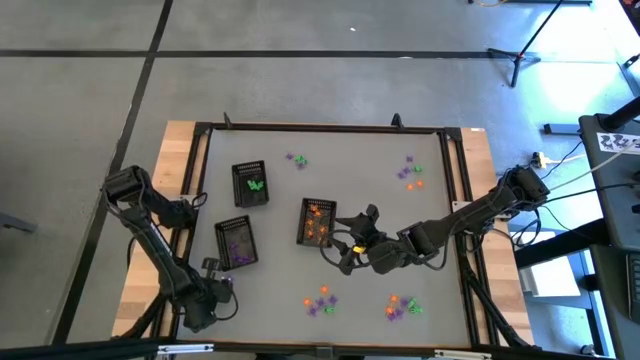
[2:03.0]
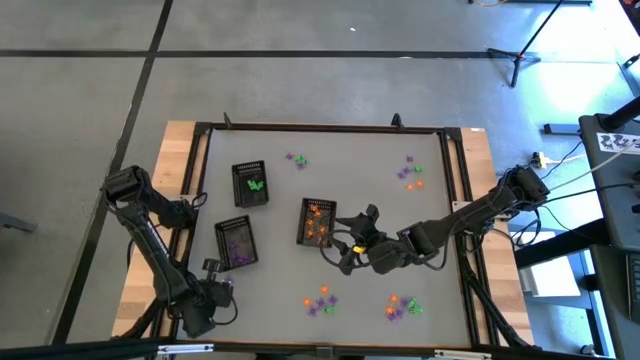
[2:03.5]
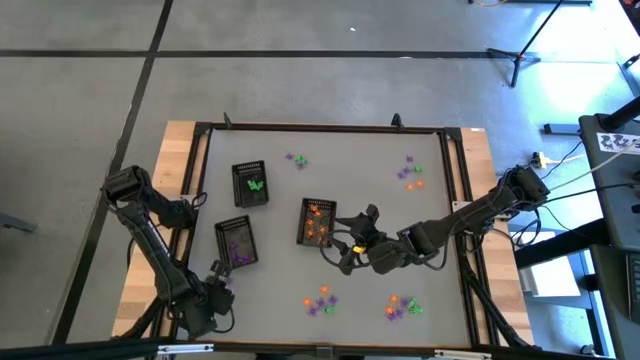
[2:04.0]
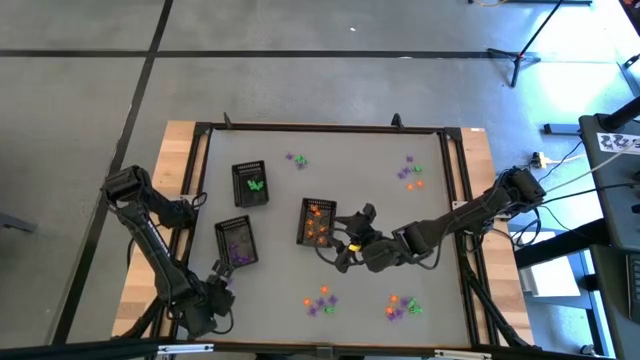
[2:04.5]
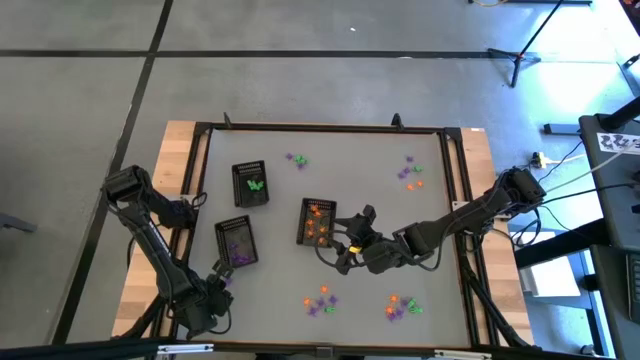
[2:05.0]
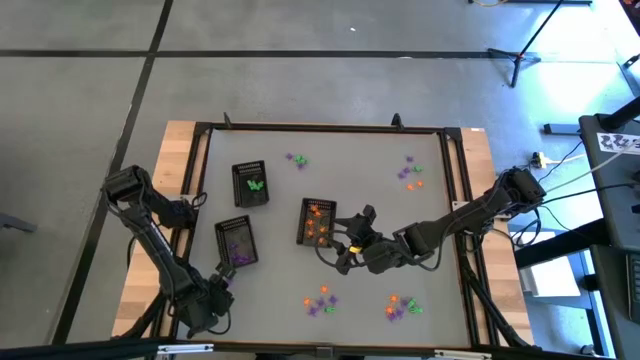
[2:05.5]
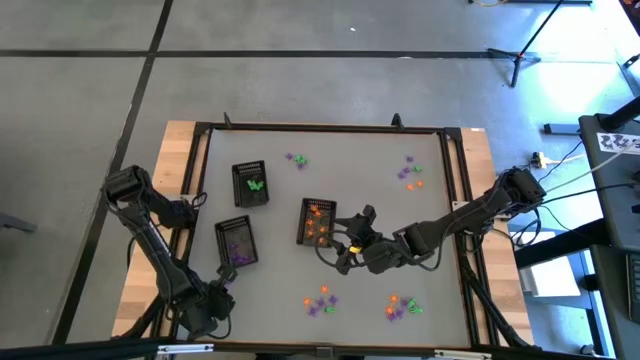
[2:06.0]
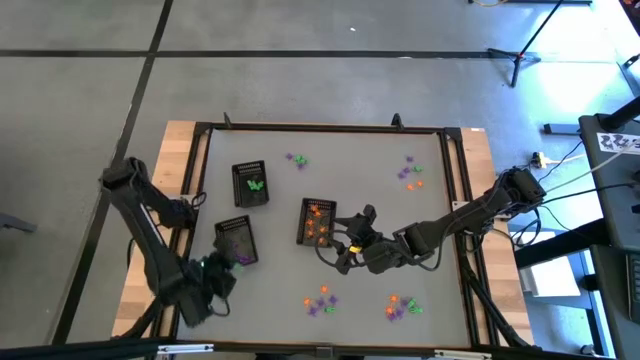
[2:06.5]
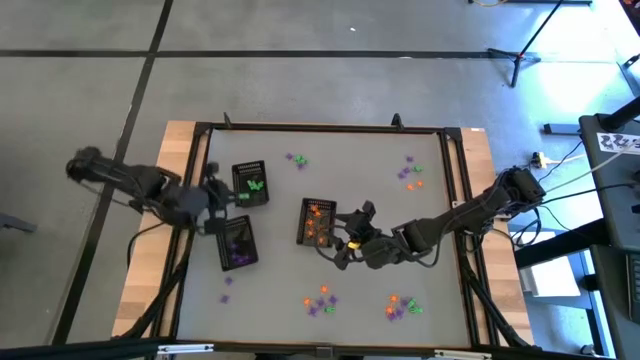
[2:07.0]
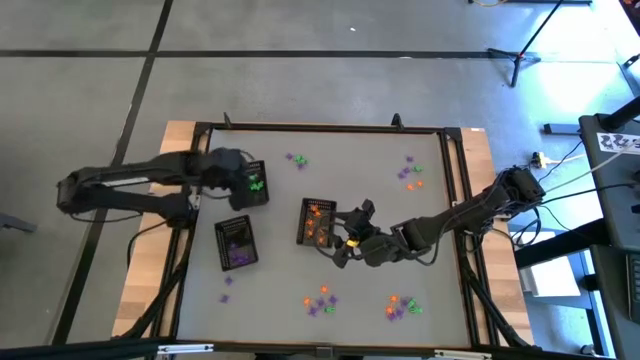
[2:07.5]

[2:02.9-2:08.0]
Task: Sort Halloween decoration
Put the green alien toy into the top left black basket

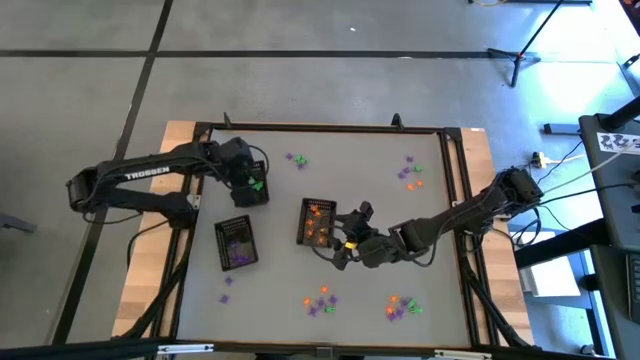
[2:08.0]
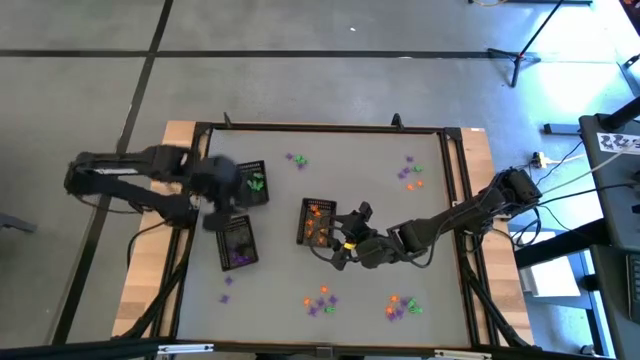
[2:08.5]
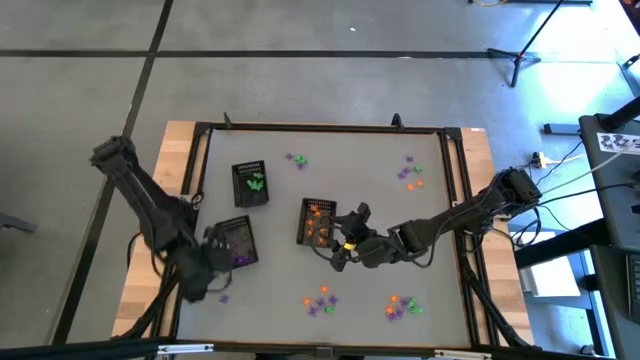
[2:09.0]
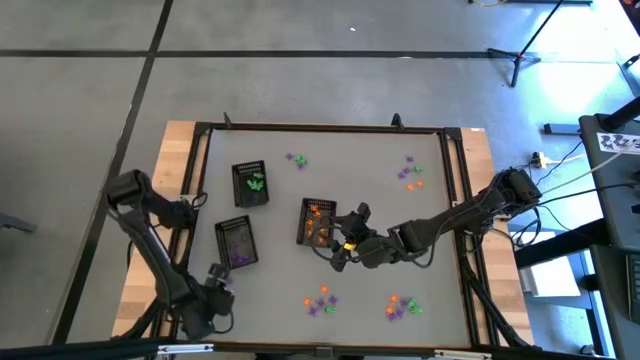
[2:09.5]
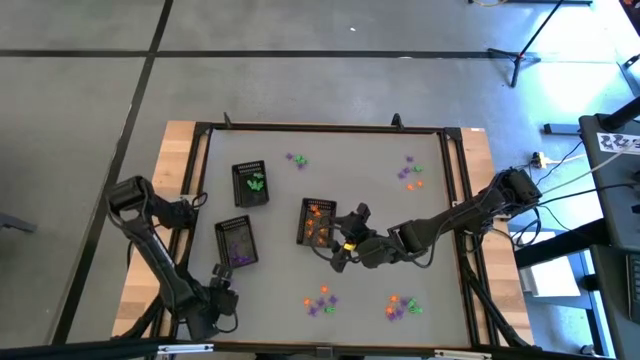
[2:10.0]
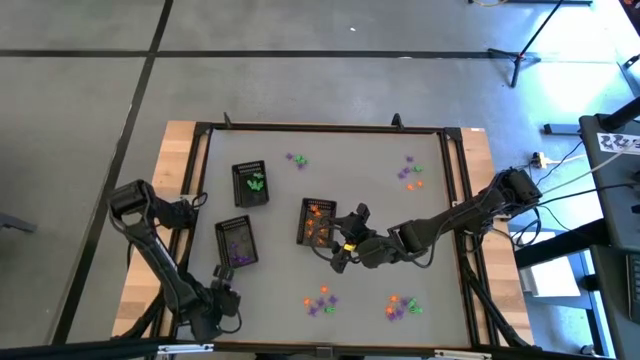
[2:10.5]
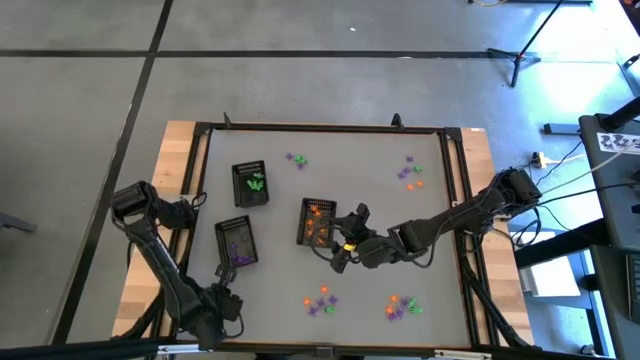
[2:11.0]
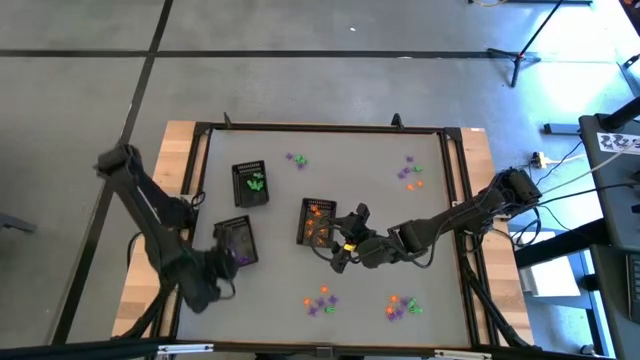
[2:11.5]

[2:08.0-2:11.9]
Put the purple spider toy into the bottom left black basket

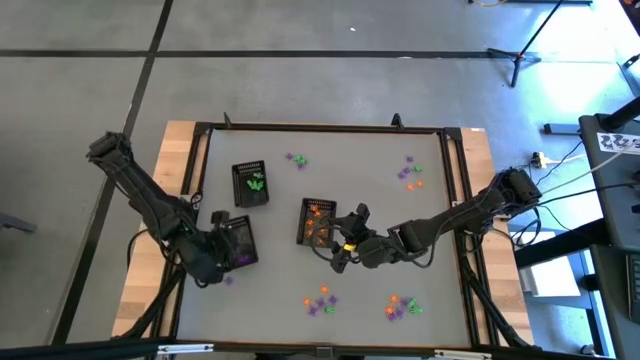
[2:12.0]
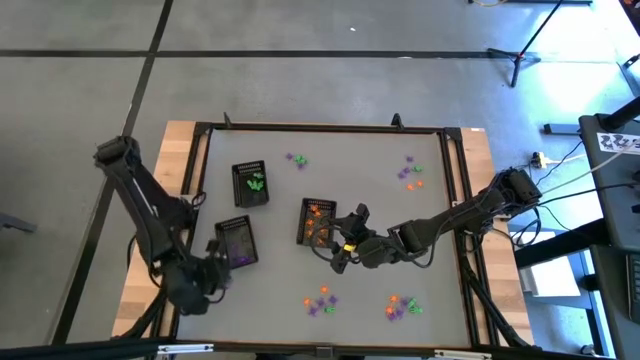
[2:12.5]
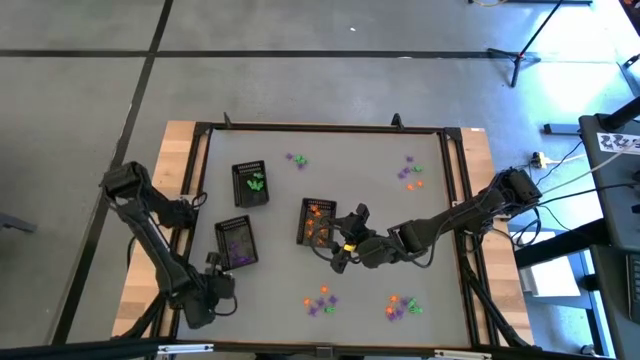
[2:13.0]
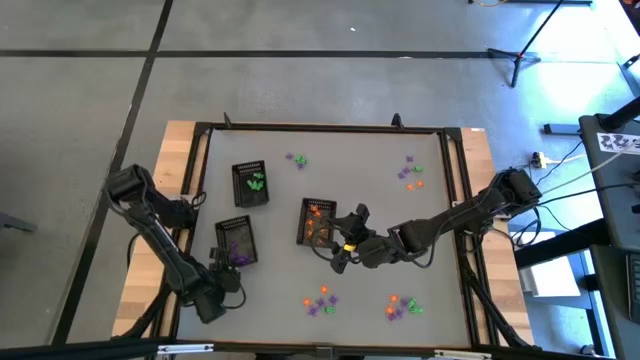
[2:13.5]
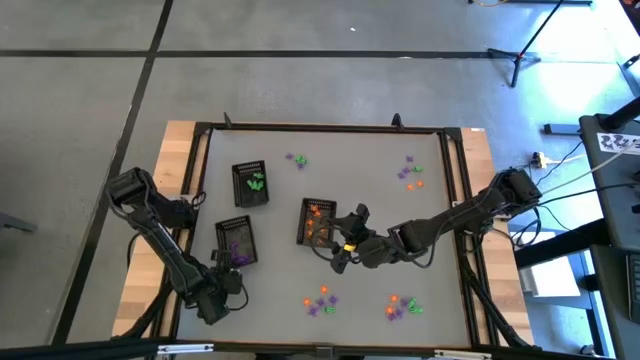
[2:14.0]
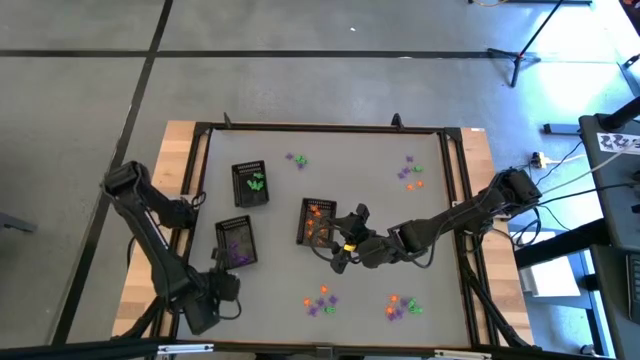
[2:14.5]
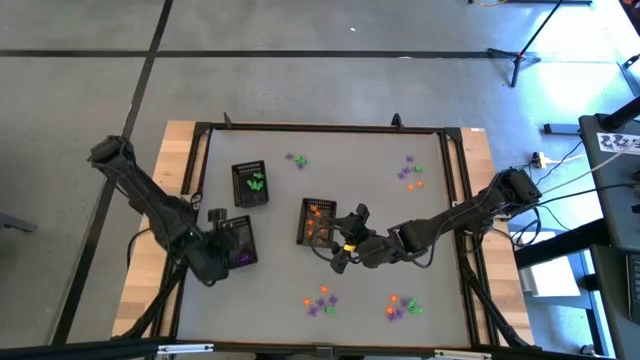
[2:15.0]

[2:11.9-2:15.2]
Put the purple spider toy into the bottom left black basket

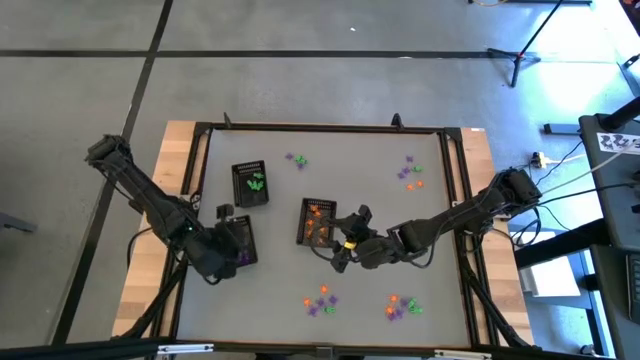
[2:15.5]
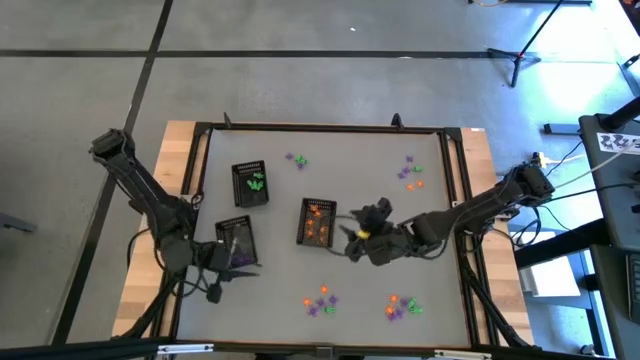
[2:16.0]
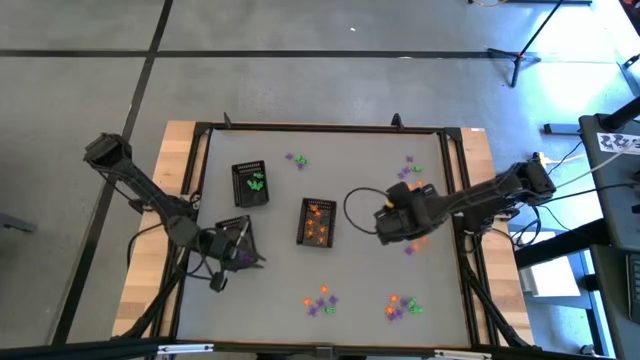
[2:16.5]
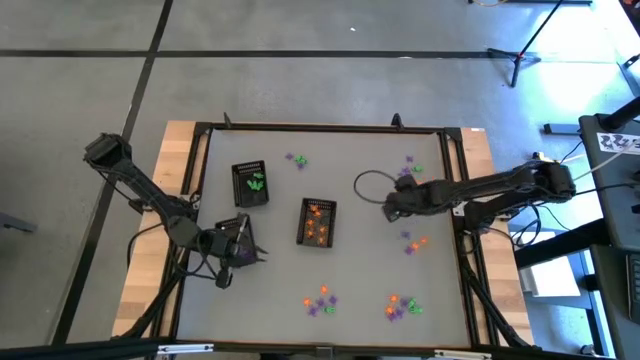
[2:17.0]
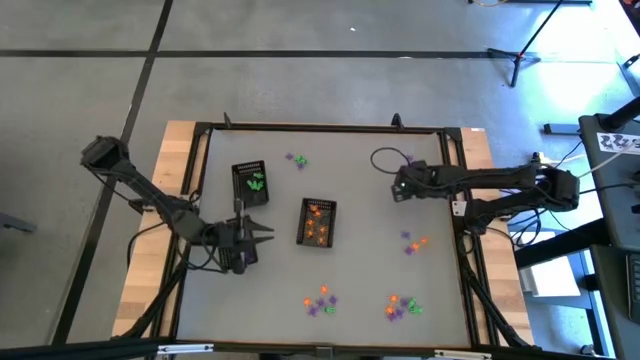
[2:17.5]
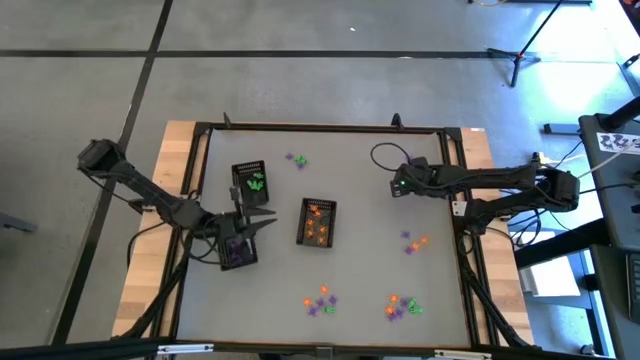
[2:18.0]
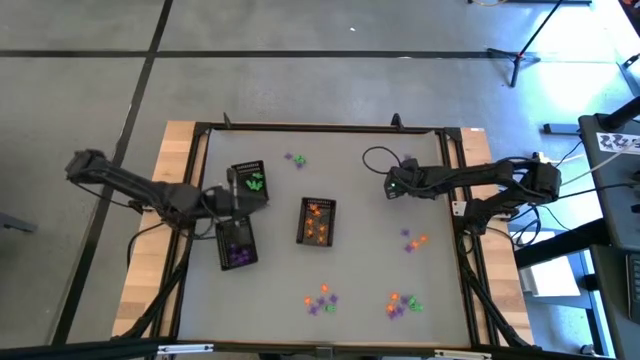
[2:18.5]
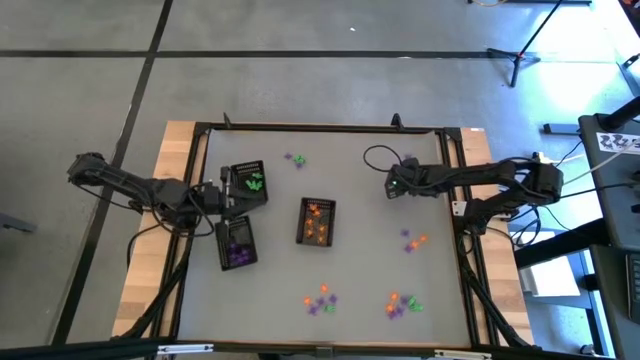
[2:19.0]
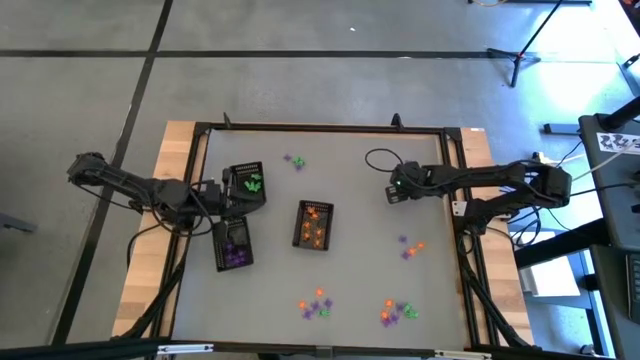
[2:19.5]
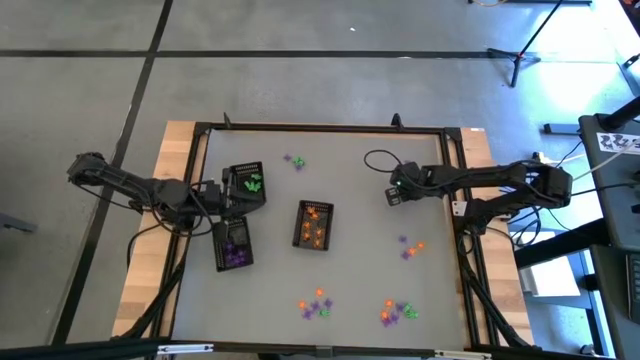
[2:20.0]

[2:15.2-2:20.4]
Put the orange spider toy into the bottom right black basket

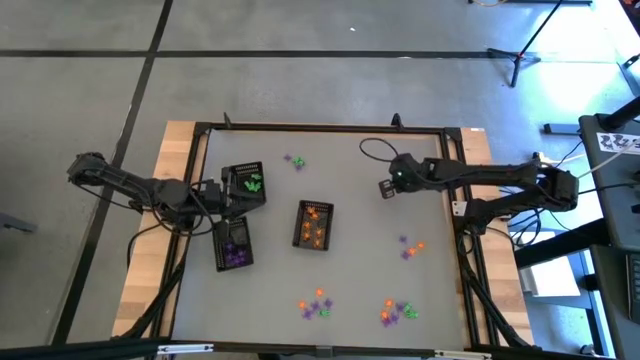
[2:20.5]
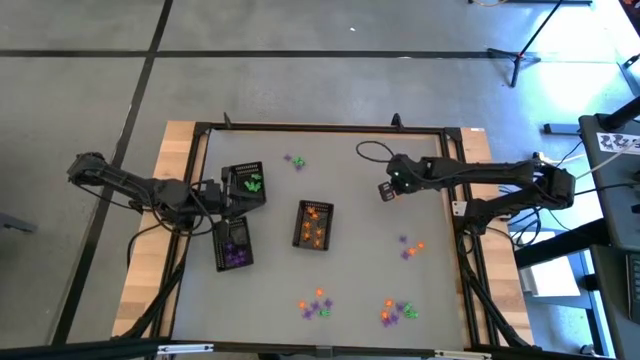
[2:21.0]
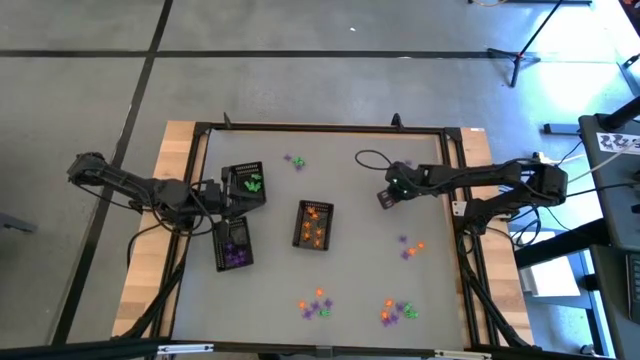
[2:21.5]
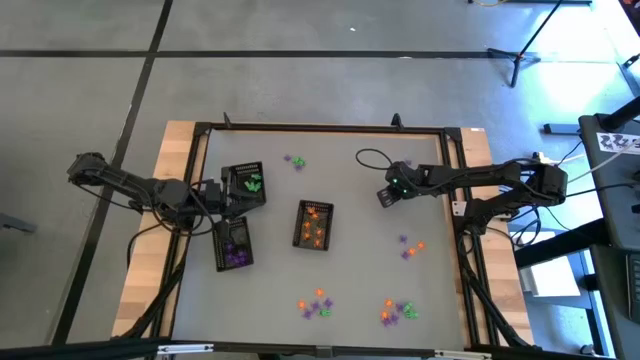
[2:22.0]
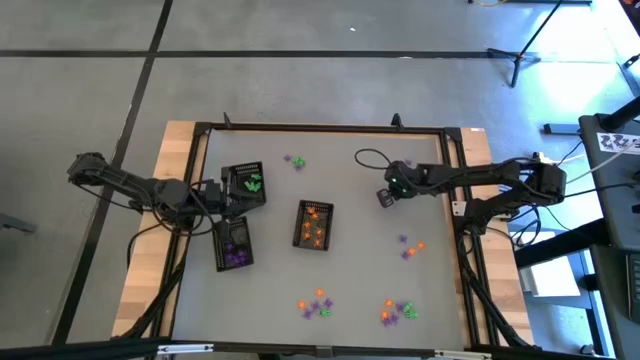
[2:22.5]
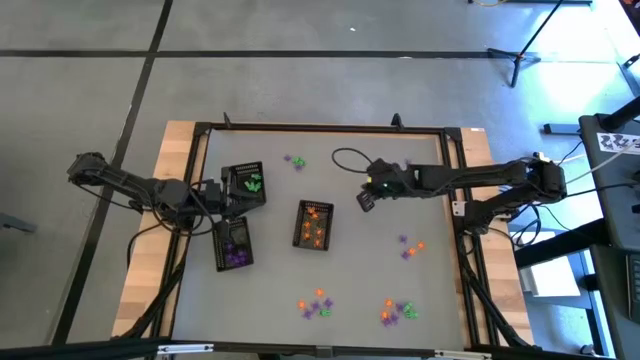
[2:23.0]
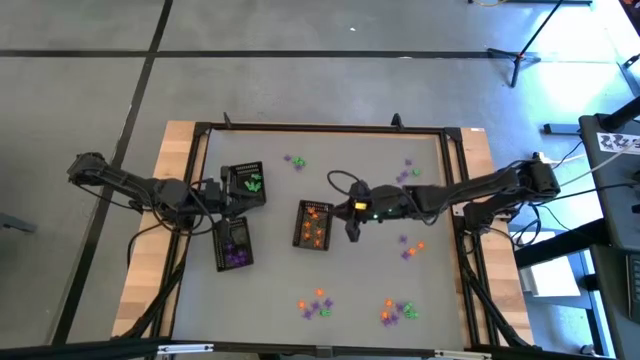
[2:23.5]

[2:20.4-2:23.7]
Put the orange spider toy into the bottom right black basket

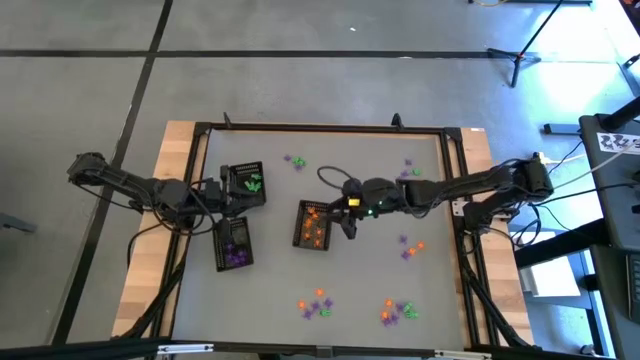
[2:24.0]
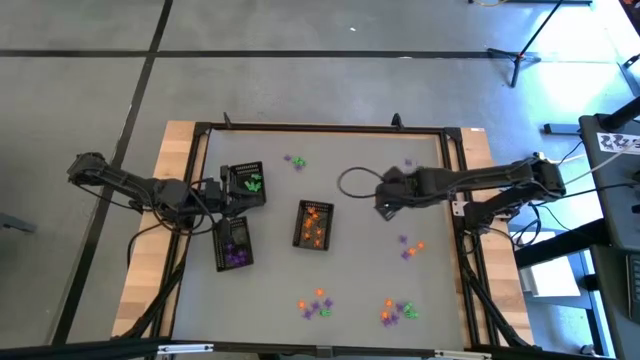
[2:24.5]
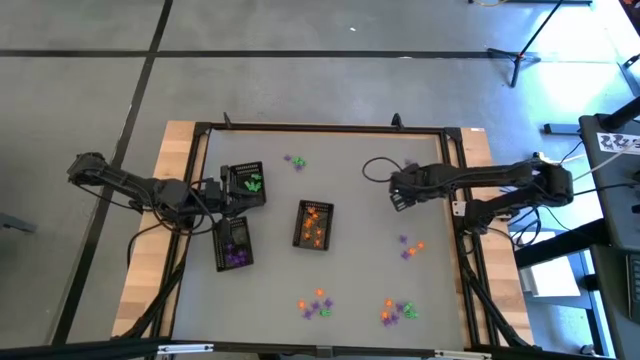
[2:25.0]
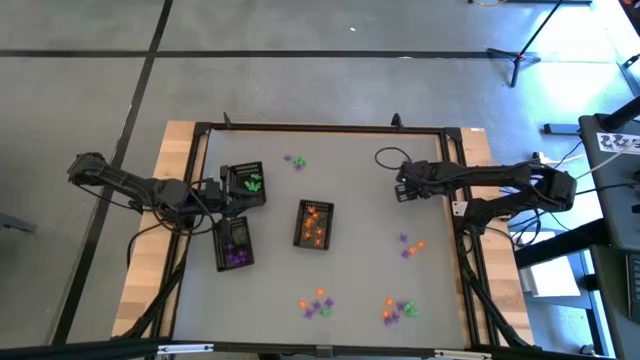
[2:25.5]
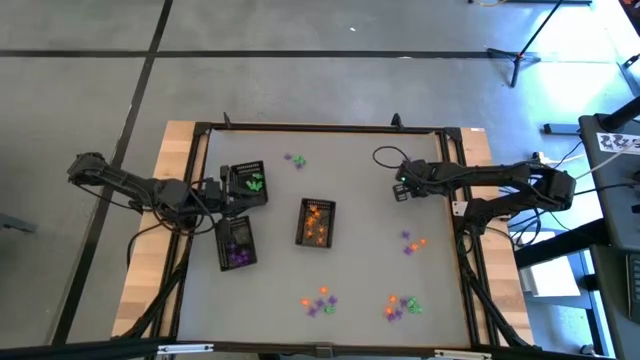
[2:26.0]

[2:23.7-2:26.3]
Put the orange spider toy into the bottom right black basket
